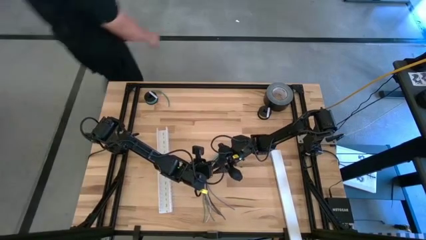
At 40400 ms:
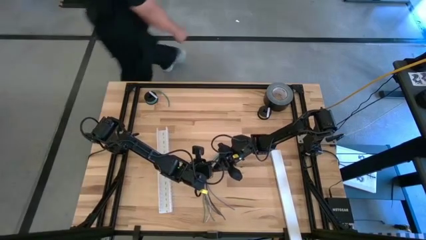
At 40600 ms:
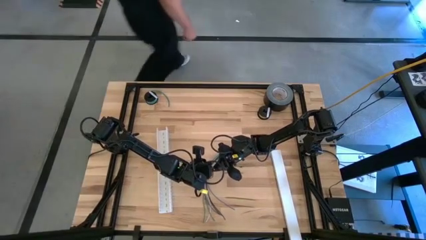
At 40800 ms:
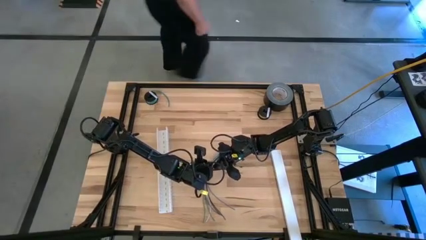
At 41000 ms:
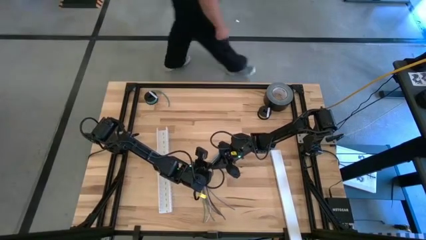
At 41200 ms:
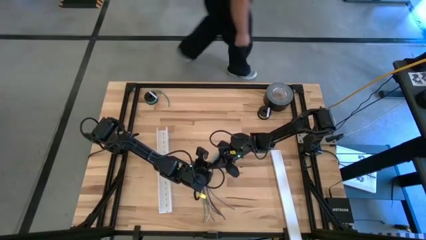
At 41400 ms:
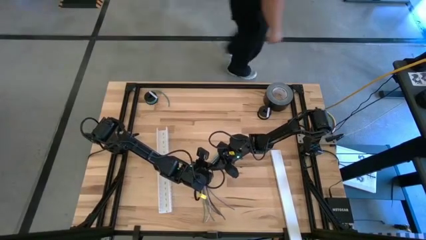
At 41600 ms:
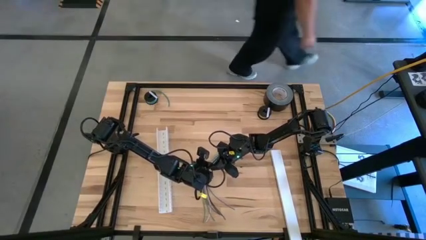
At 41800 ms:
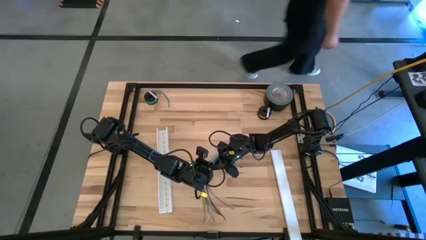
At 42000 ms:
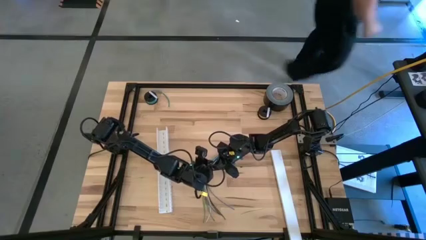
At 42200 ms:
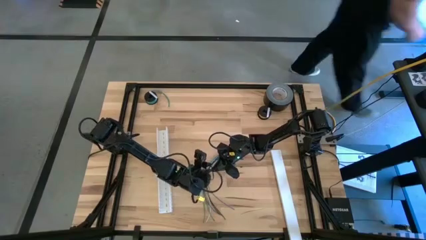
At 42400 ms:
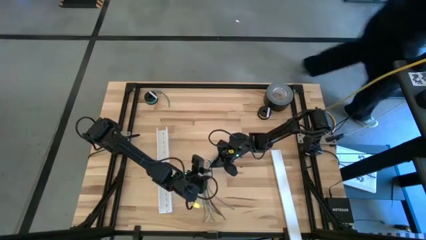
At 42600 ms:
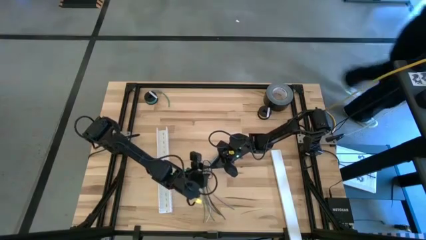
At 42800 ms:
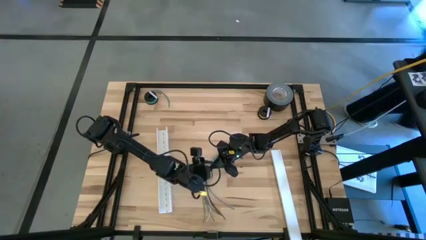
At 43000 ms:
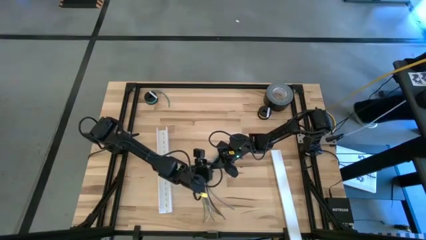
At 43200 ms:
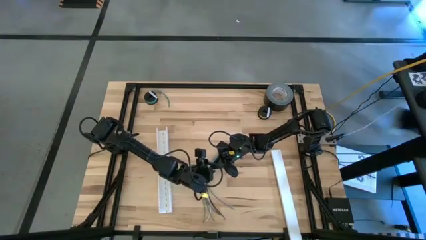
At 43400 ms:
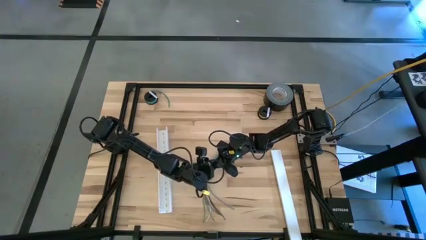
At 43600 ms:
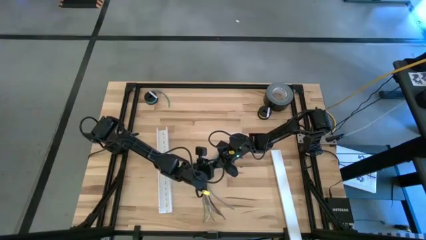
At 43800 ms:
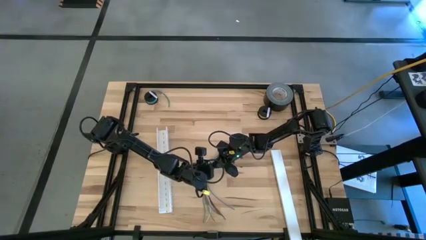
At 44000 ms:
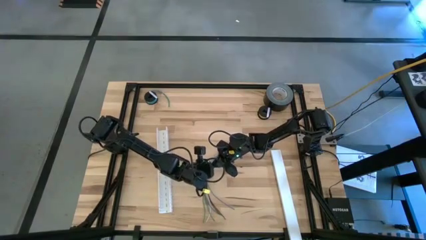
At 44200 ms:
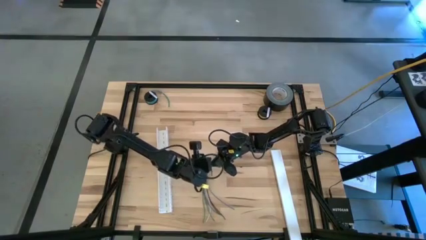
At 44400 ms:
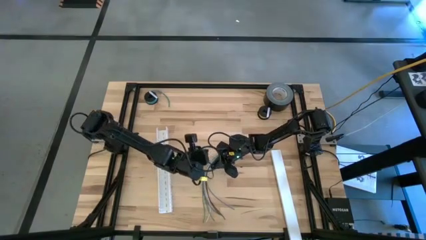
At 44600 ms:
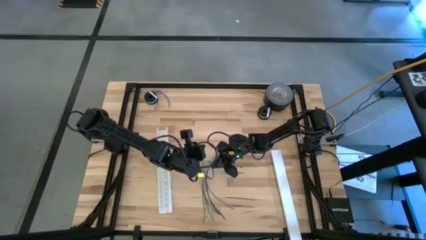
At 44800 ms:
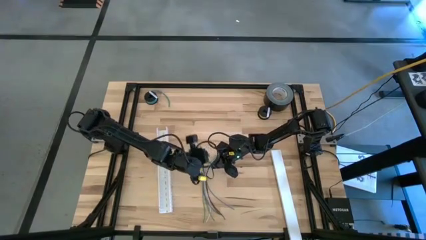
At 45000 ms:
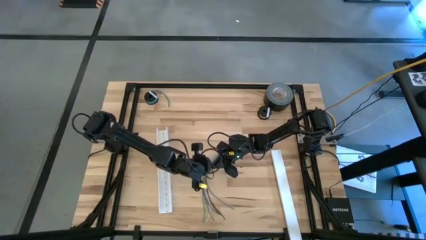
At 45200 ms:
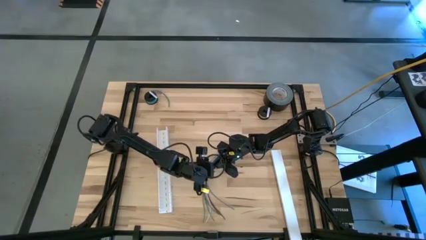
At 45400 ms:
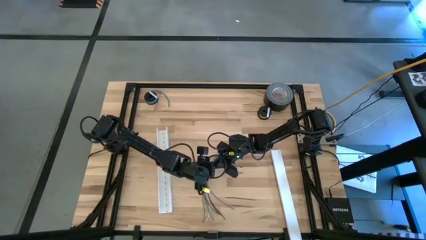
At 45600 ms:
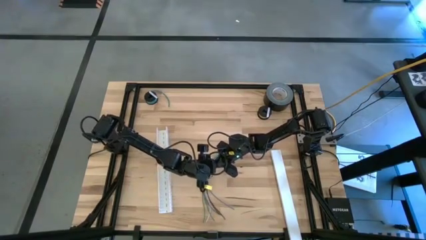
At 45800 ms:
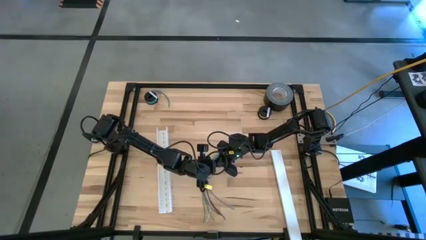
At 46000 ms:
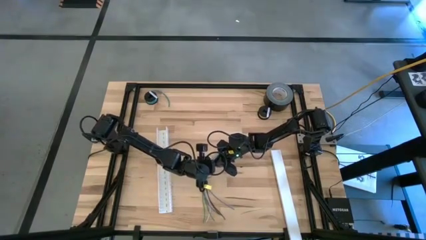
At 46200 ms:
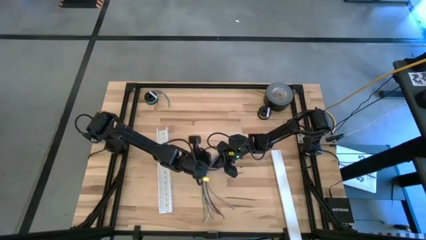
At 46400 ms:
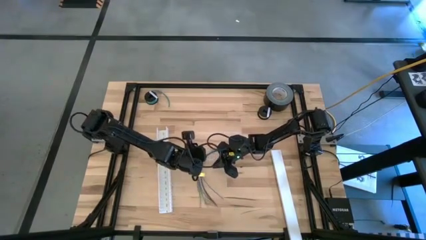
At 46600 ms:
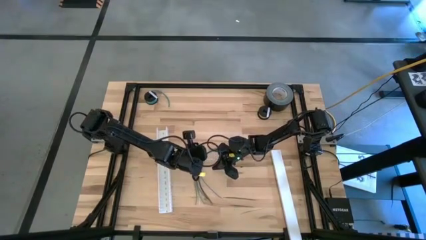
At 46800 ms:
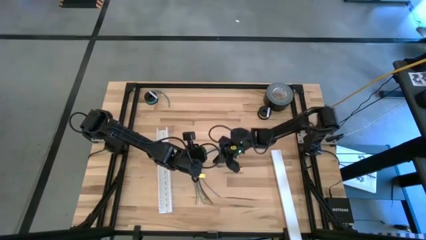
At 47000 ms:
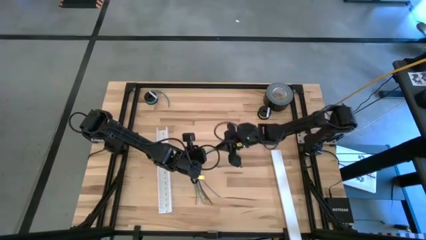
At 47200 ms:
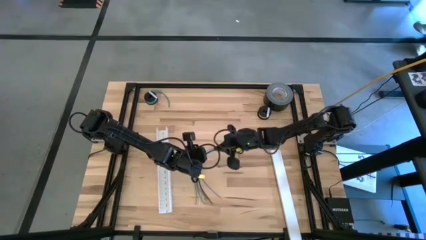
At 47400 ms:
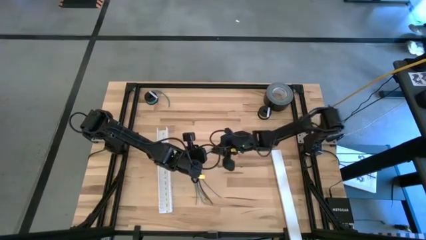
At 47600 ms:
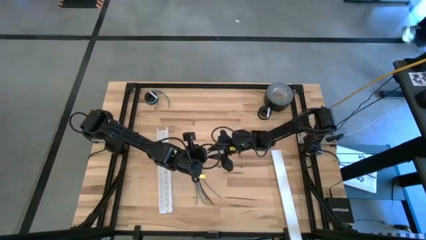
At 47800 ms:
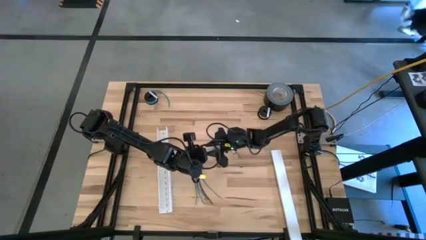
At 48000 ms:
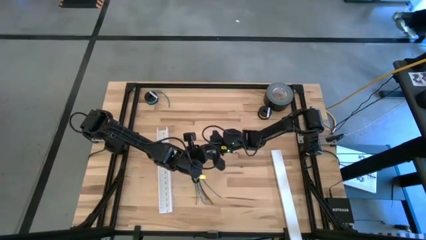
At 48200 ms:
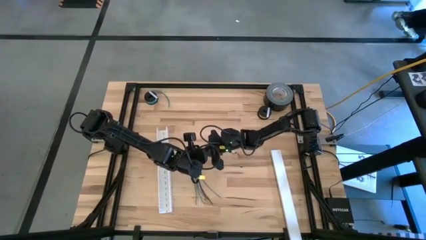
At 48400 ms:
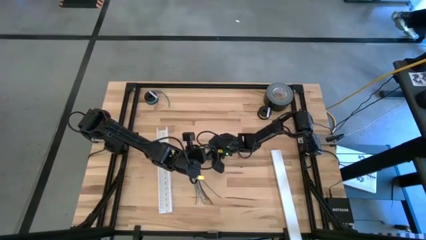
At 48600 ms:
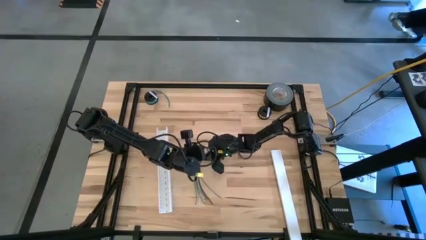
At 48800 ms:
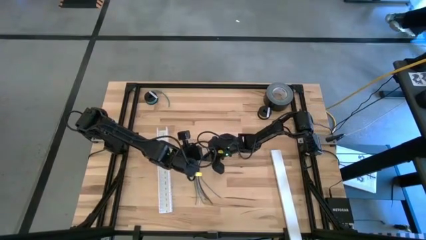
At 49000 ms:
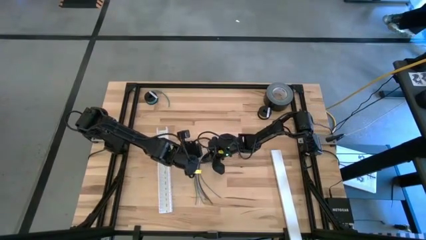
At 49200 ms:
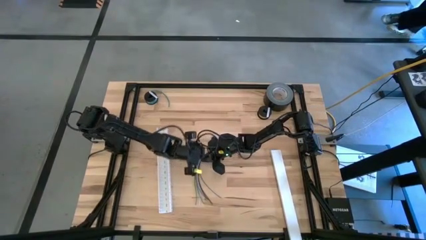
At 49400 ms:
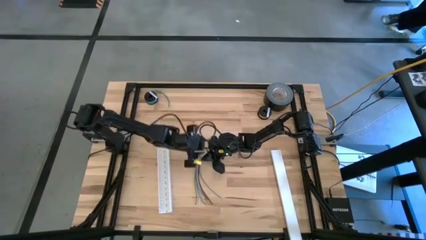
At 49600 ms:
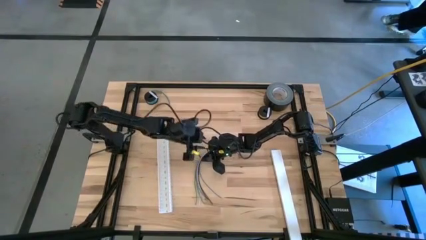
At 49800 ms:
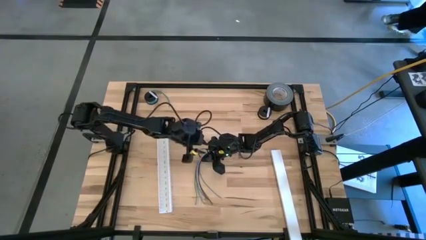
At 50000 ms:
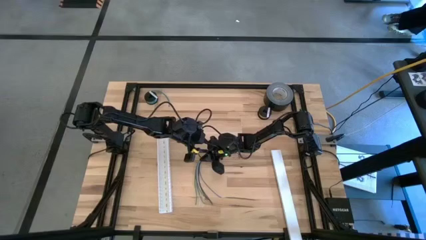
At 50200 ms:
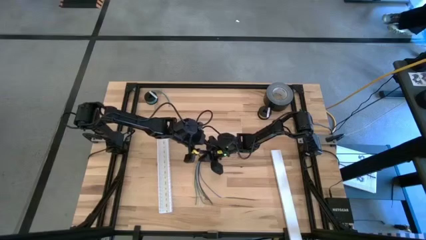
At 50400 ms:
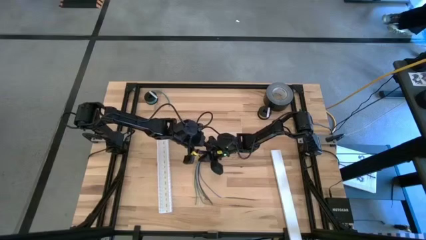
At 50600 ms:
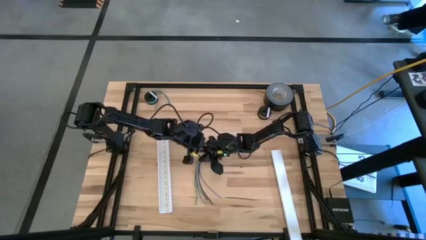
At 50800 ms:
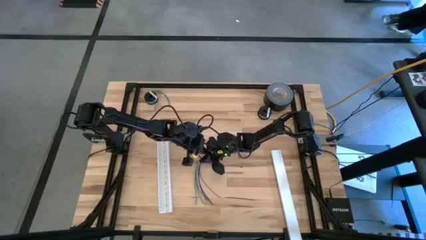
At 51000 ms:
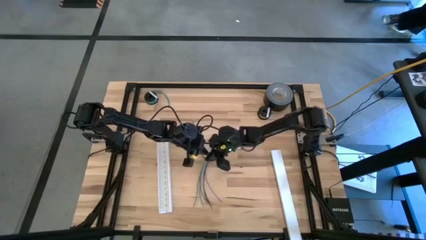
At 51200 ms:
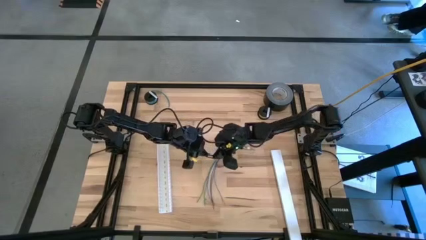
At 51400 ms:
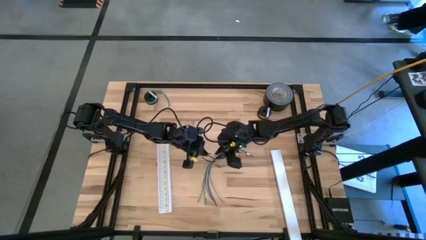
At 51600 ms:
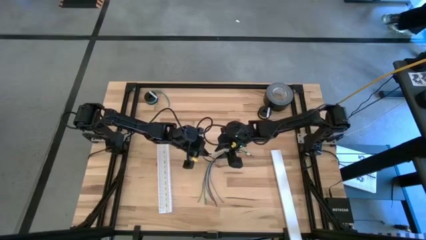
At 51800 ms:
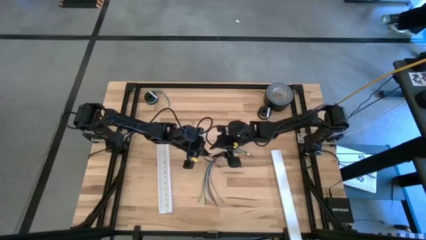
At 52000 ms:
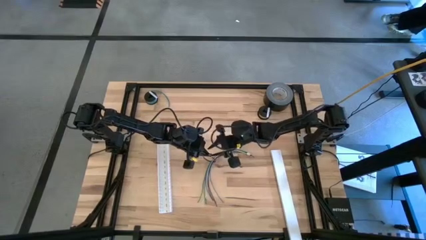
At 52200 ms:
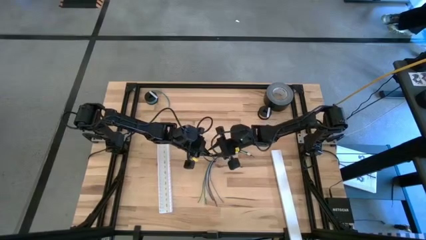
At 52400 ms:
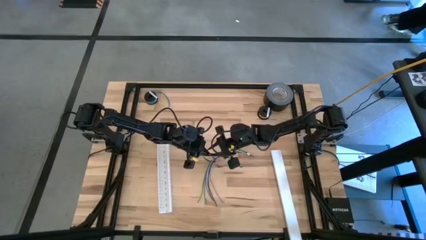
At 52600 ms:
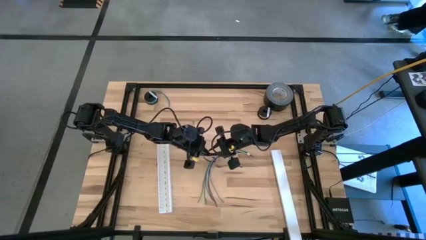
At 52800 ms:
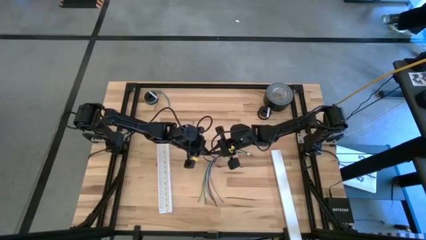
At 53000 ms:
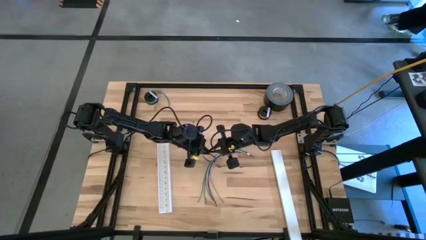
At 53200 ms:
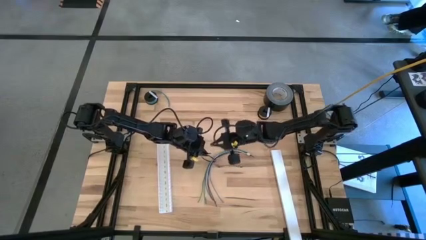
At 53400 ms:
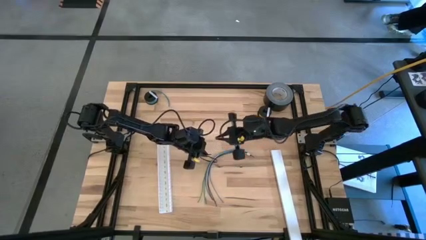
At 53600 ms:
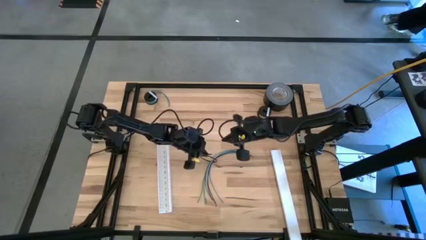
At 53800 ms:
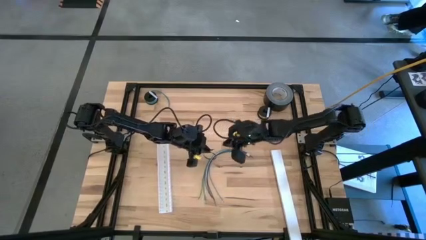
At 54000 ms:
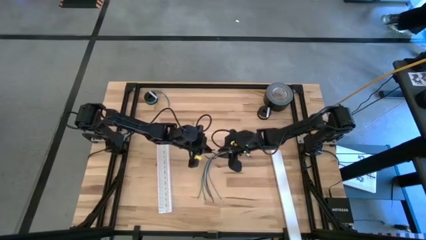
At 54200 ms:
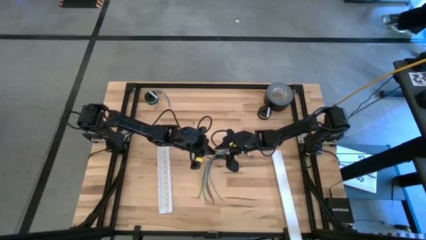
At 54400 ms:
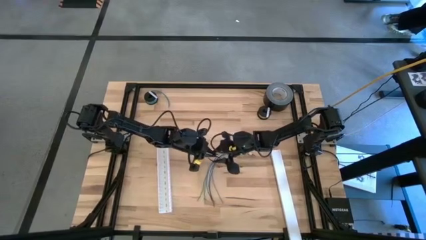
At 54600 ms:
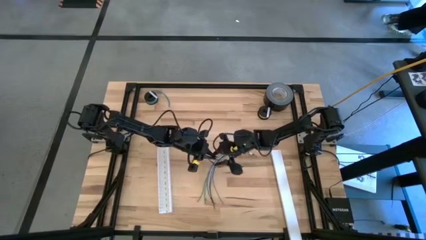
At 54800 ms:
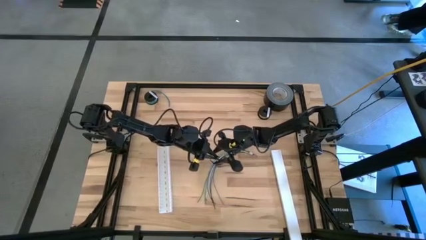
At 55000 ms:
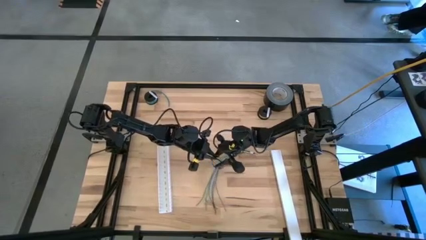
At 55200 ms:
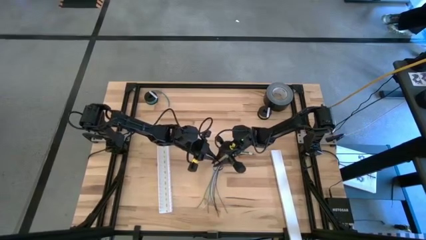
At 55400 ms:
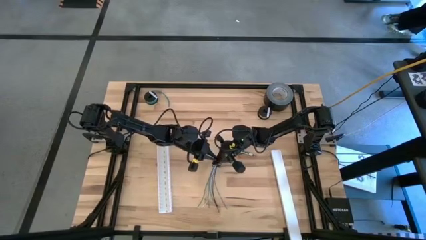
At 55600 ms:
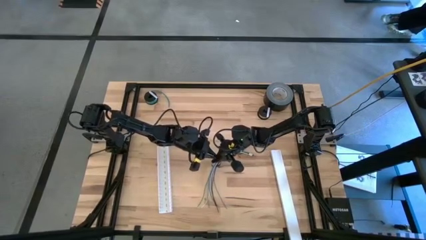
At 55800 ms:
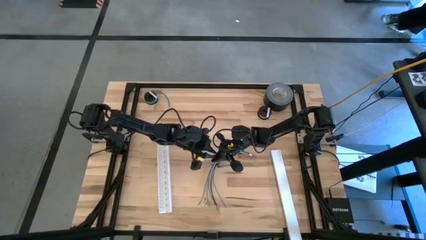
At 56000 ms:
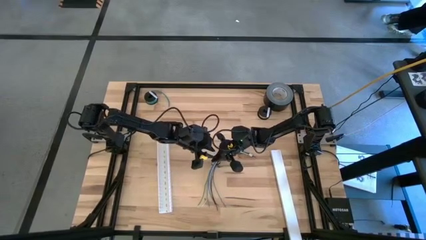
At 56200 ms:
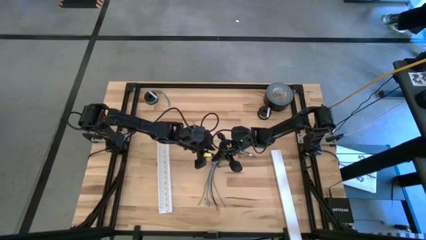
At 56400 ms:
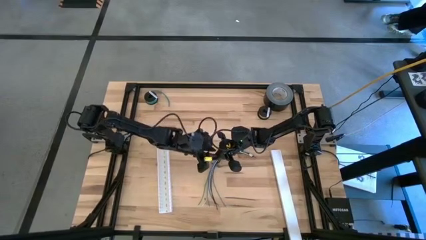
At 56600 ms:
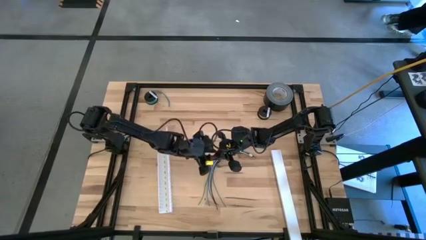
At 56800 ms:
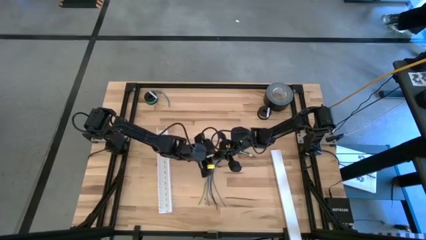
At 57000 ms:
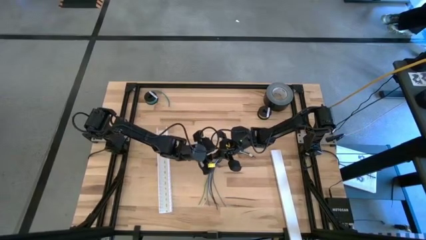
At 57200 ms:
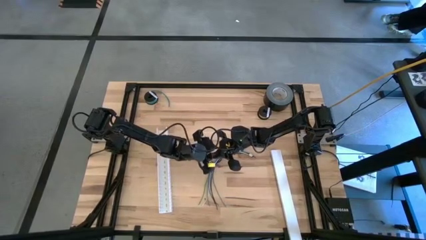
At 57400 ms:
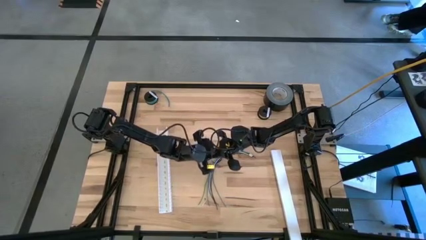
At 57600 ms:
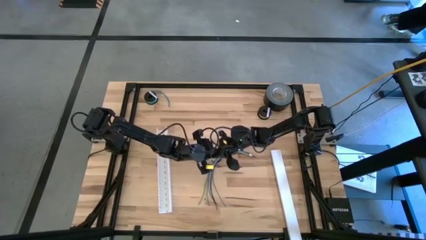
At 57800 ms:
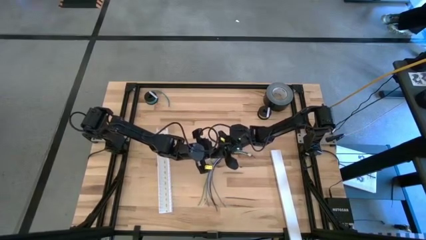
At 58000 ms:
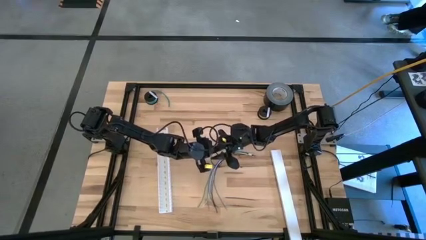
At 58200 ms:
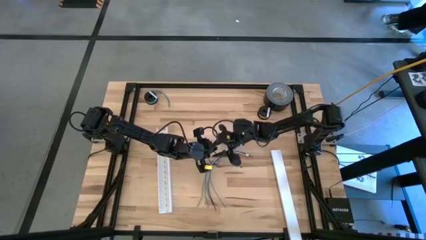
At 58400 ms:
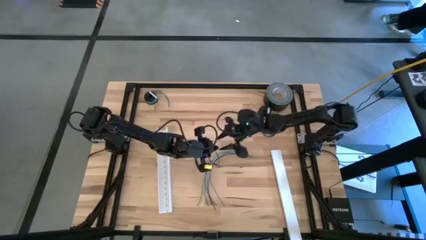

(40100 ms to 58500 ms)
Task: Ziptie cables
Wrap the colored cables with the black zip tie
